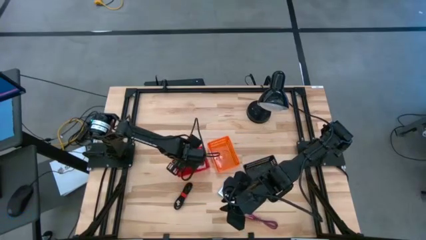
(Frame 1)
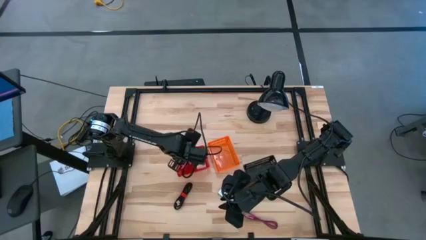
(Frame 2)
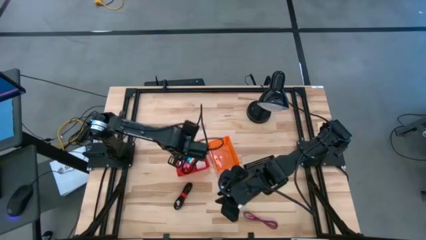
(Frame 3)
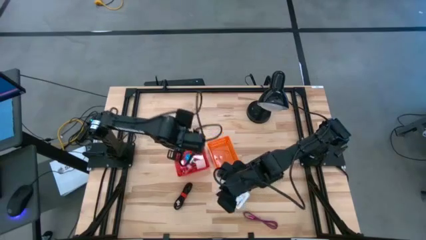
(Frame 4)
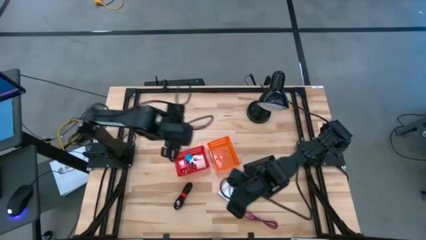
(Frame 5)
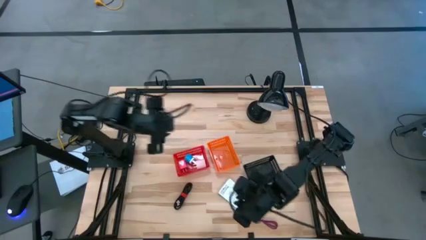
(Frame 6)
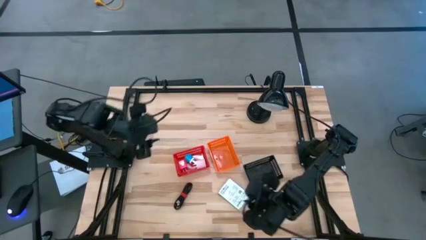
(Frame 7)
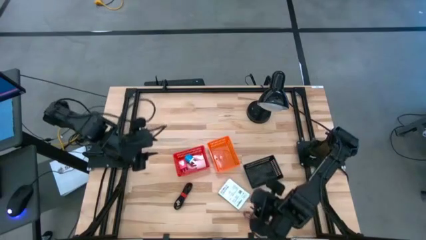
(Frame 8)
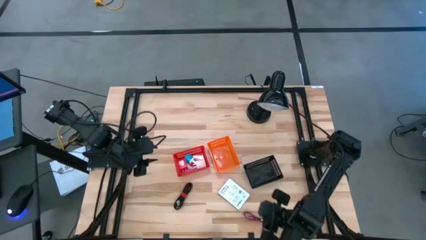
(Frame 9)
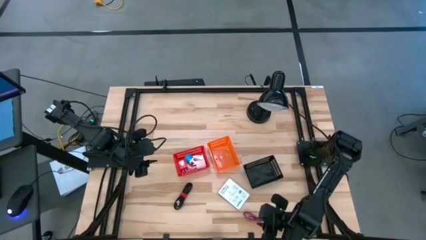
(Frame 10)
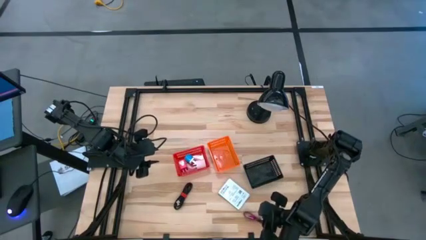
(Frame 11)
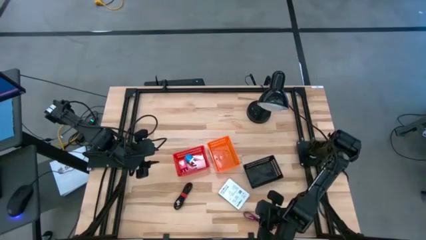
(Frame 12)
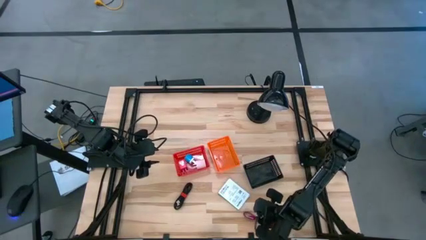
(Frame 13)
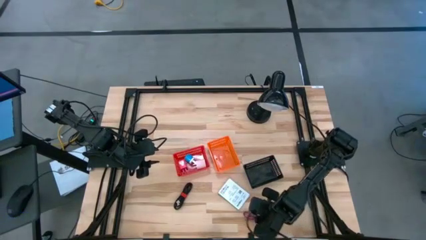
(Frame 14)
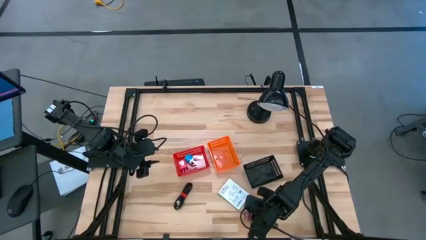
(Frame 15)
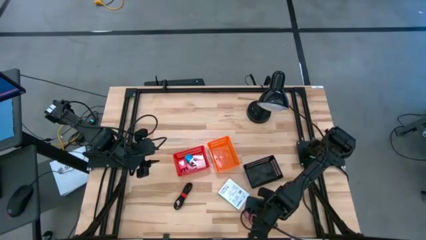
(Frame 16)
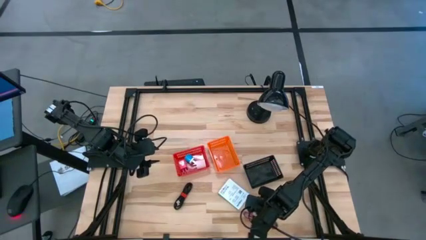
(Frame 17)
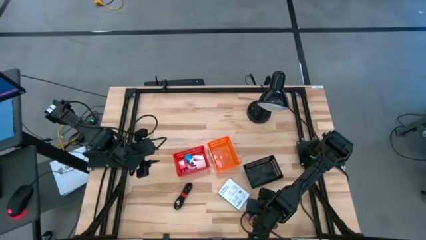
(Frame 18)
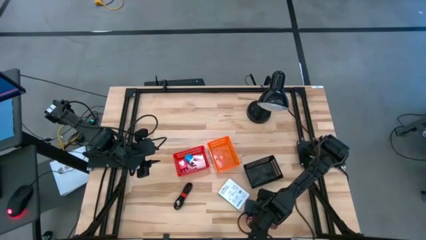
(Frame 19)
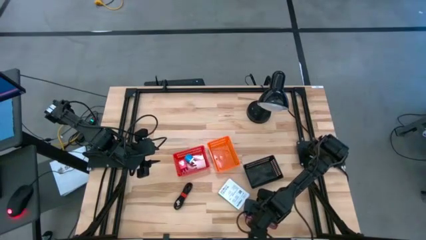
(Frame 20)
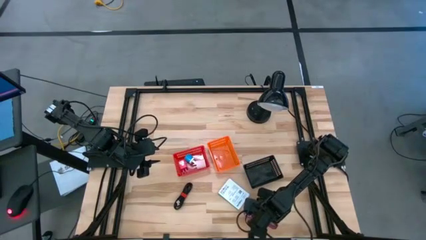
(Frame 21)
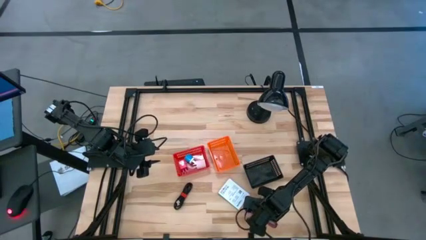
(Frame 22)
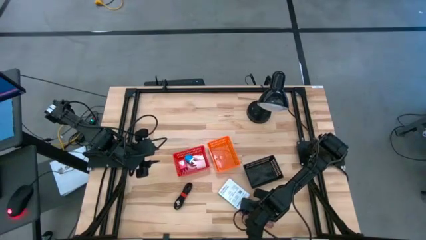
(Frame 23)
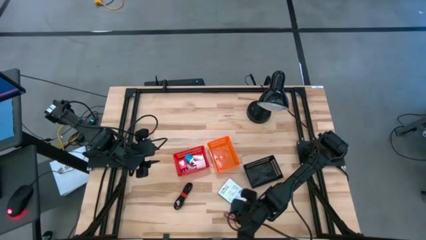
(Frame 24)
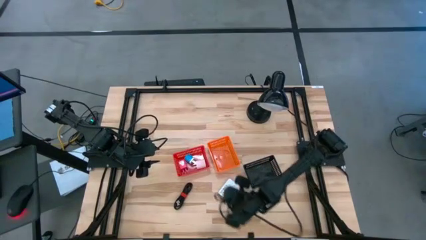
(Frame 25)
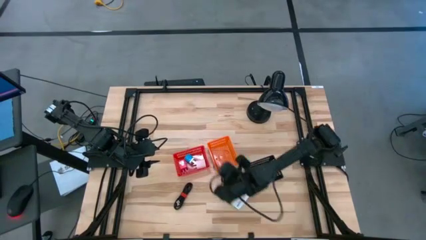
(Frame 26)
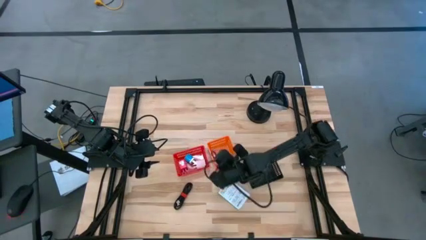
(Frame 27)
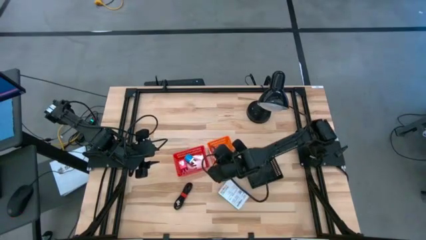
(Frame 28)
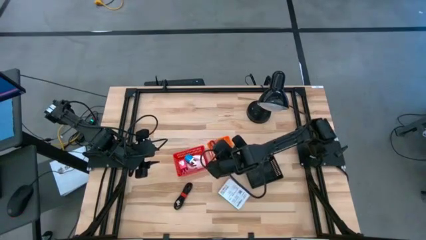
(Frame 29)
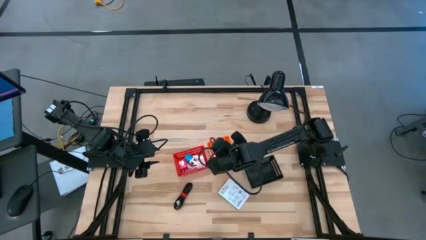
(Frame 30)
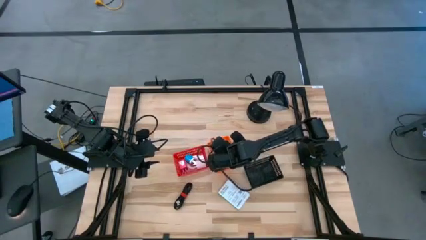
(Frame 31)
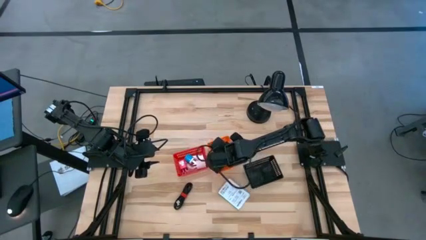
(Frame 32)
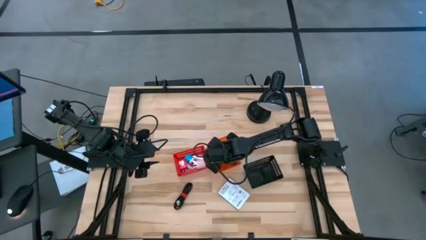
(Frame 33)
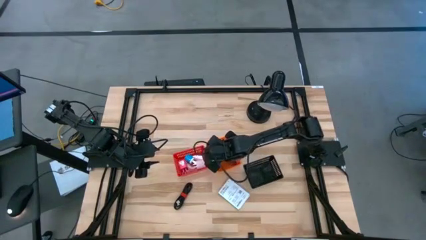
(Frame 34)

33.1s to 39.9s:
Task: Pick and place items into bin
Put the pink USB cable into the orange bin

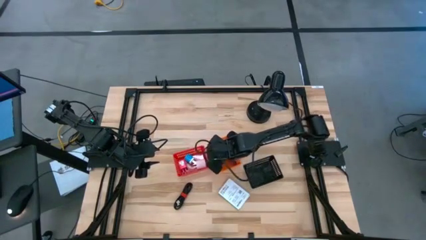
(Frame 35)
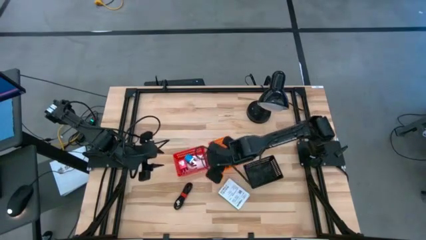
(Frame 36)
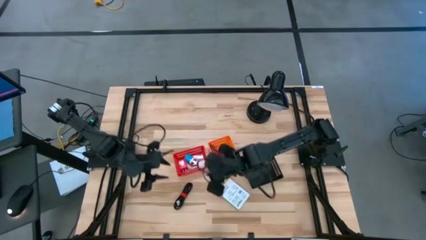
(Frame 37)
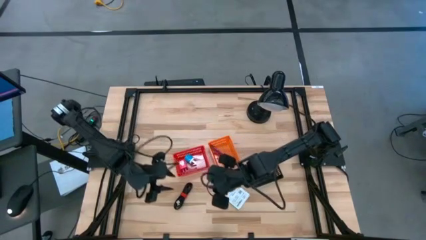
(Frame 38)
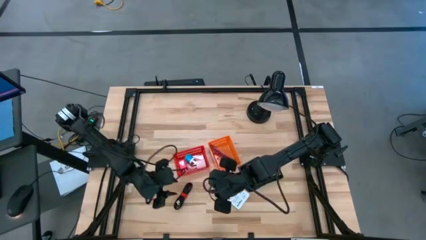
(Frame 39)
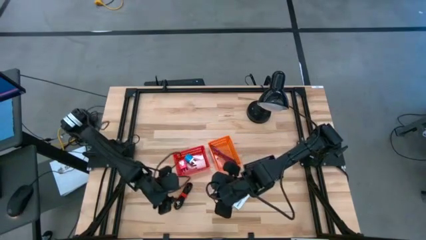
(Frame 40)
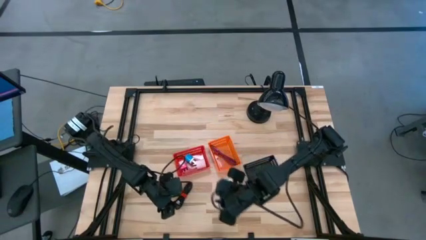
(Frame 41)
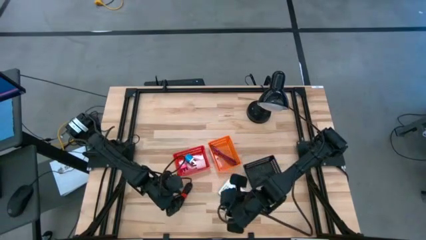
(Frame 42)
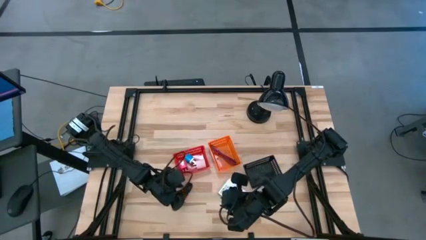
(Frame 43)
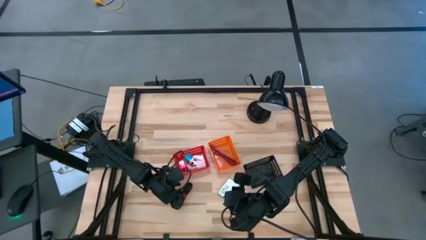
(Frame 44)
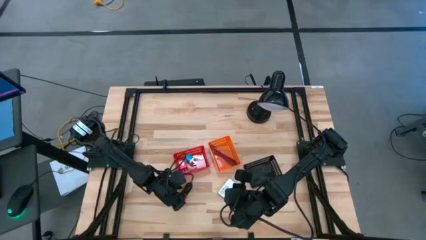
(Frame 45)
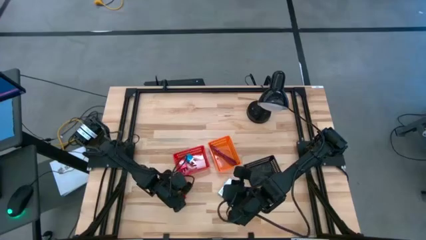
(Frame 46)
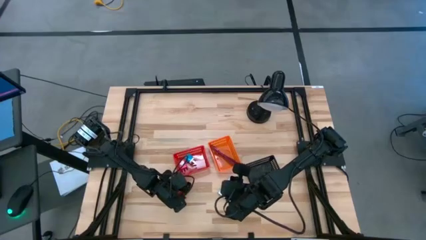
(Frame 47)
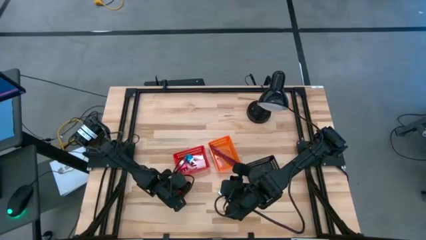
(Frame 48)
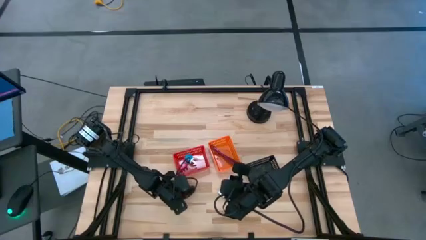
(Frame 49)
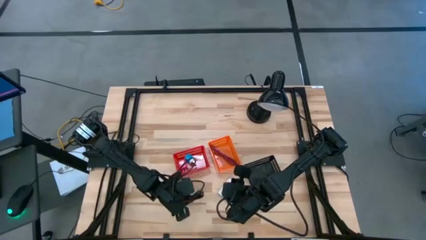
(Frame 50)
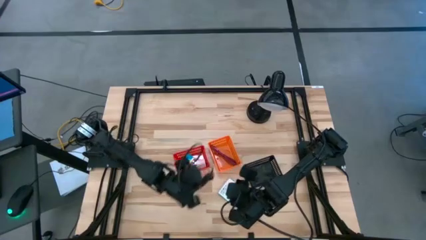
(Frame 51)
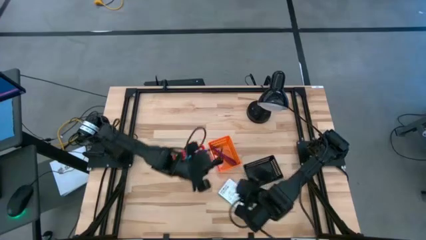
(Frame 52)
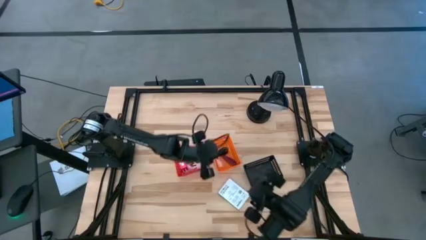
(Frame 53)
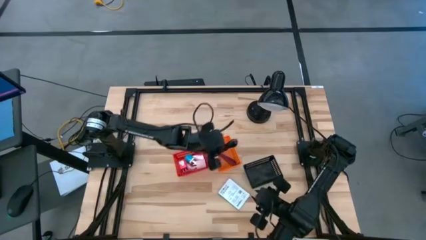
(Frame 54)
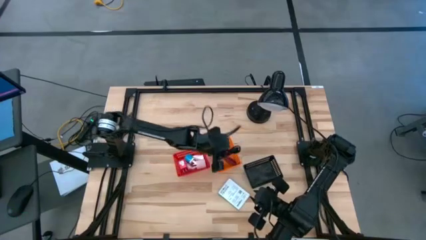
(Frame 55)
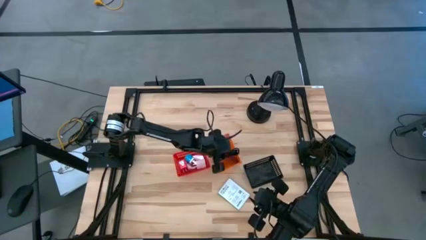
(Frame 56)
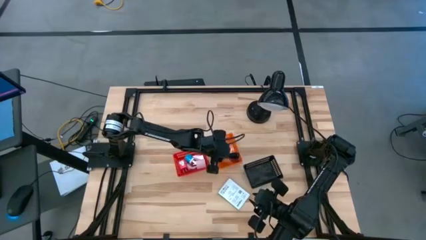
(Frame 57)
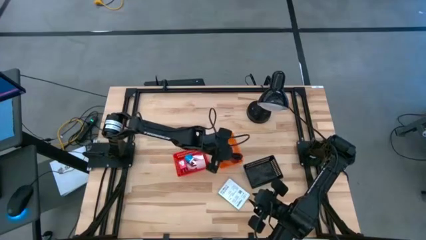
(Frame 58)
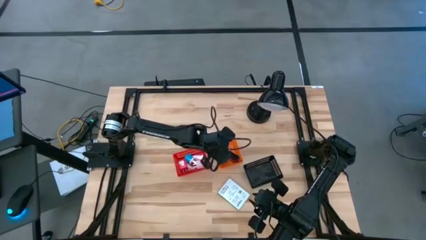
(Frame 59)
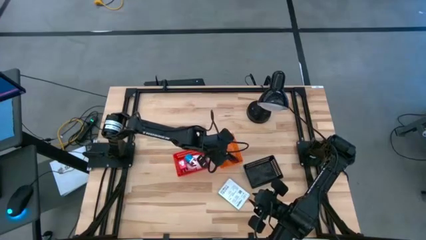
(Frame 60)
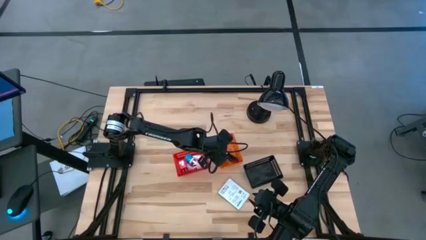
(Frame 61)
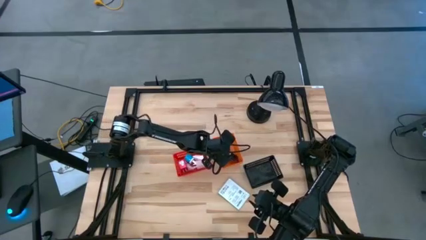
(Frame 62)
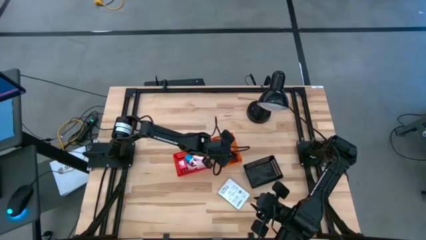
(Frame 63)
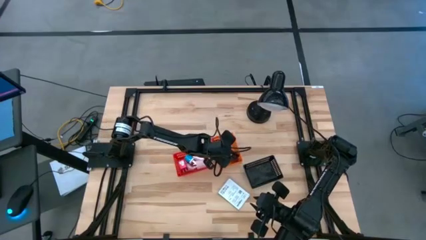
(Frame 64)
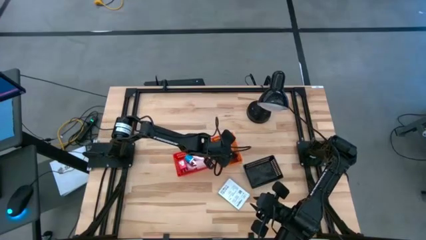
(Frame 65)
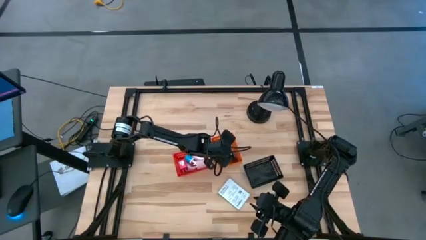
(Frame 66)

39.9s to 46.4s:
Put the black USB cable into the orange bin

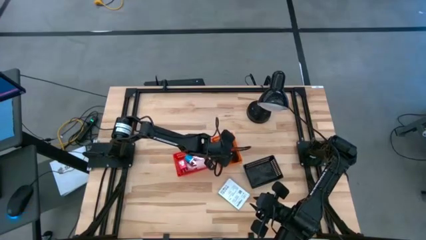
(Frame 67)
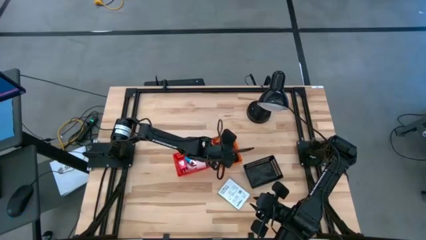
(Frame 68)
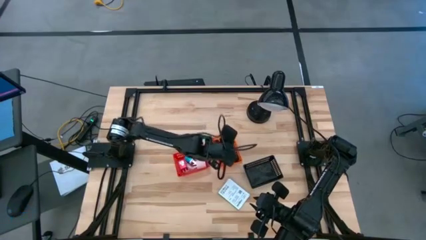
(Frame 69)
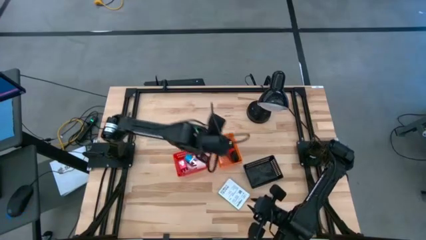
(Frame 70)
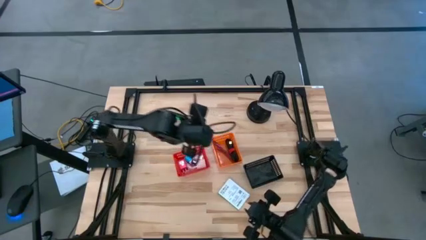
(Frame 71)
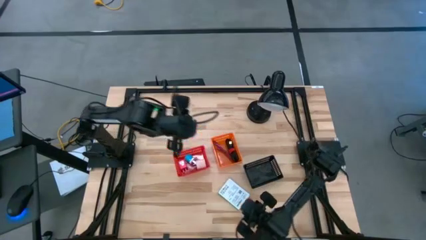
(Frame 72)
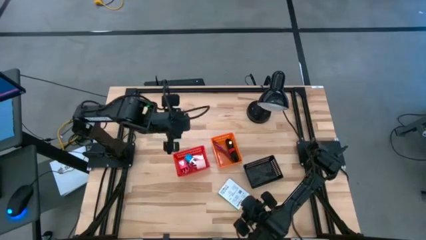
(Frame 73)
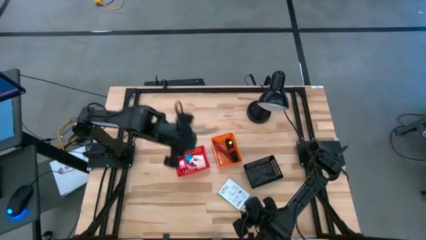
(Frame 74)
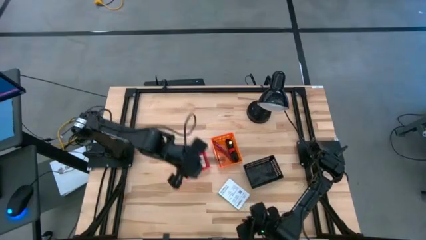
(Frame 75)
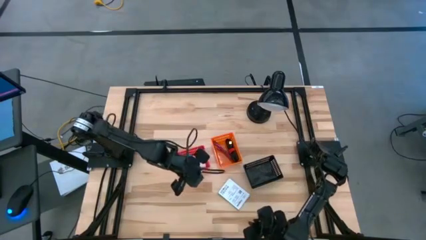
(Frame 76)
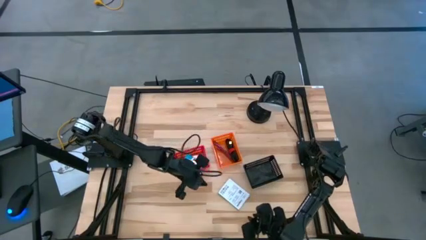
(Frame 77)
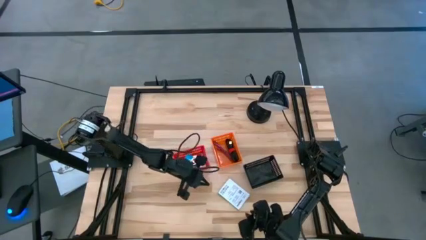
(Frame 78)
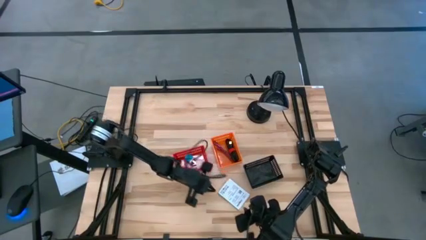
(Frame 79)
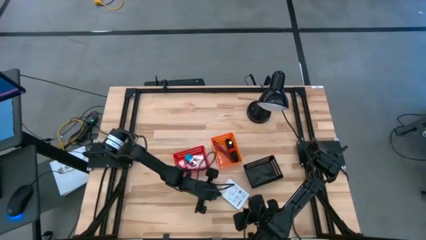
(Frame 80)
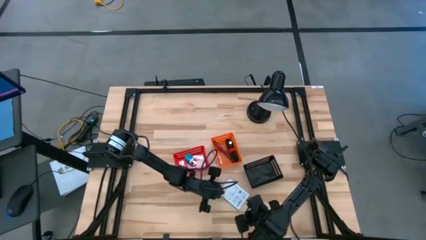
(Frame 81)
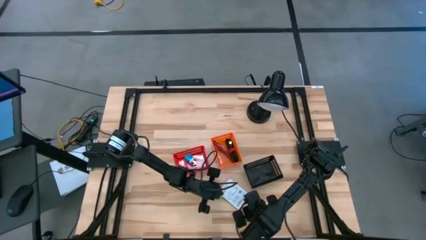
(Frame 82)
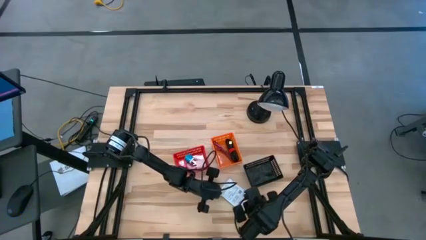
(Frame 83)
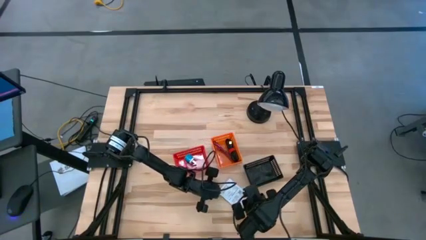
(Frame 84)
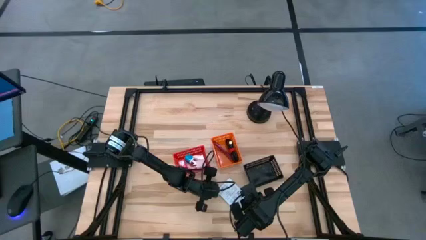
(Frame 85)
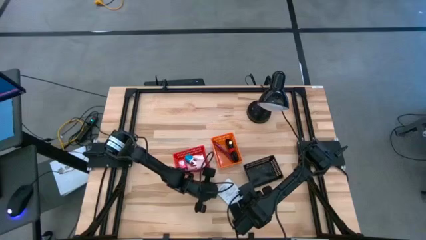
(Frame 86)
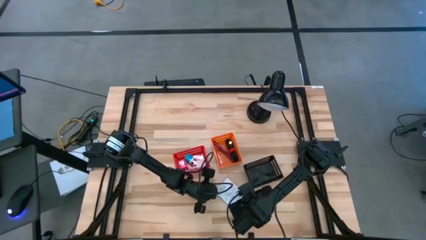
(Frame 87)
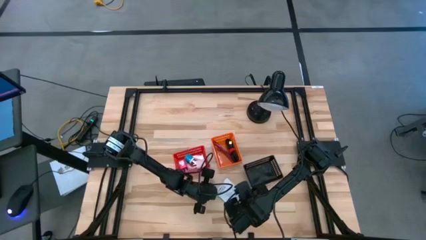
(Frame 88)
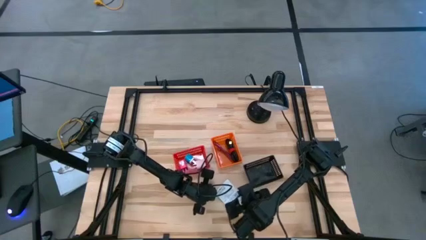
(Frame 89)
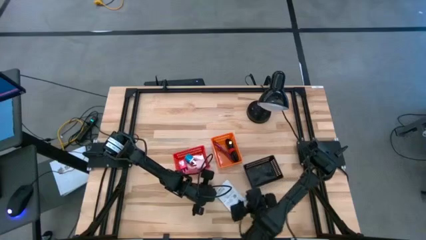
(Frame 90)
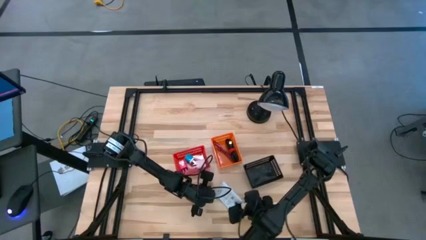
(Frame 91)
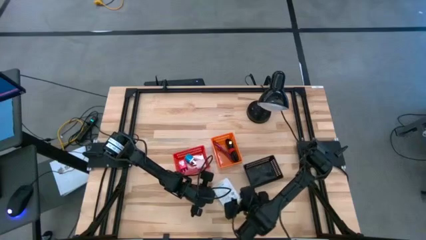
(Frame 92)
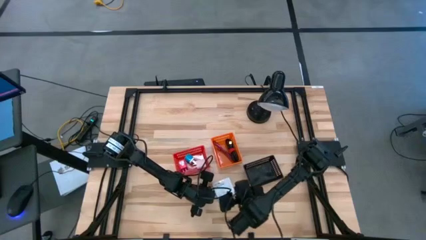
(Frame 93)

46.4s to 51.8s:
Put the white card reader box in the black bin
